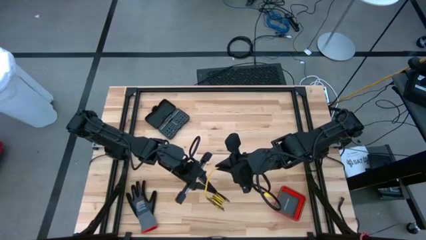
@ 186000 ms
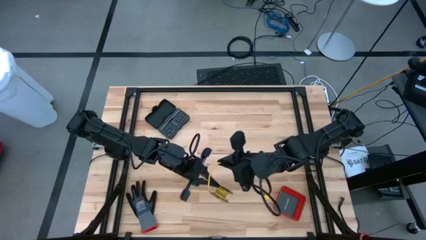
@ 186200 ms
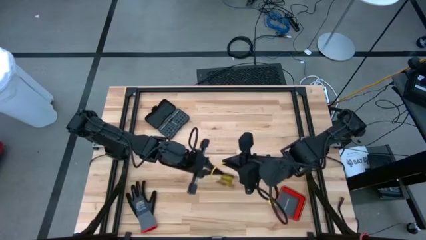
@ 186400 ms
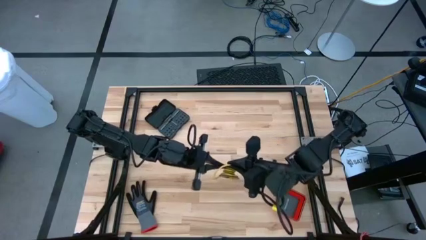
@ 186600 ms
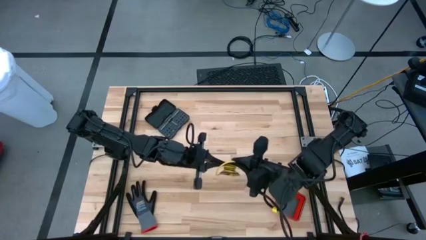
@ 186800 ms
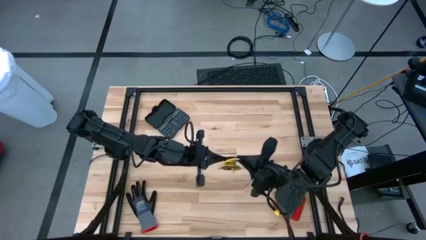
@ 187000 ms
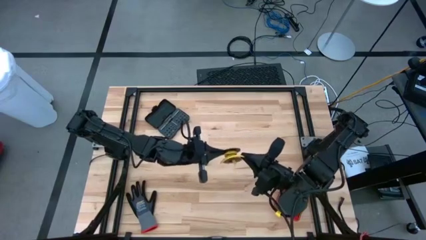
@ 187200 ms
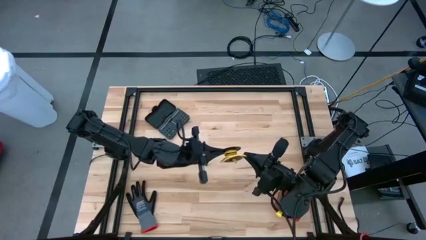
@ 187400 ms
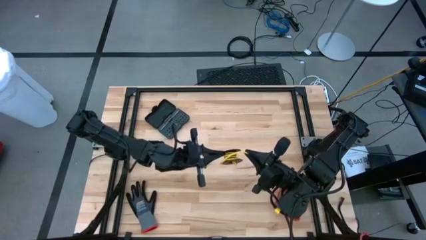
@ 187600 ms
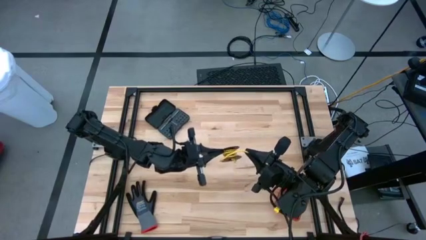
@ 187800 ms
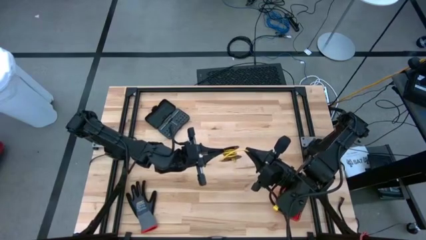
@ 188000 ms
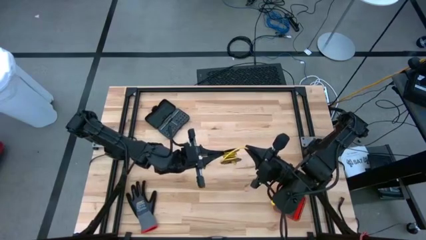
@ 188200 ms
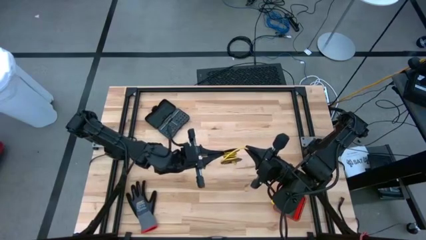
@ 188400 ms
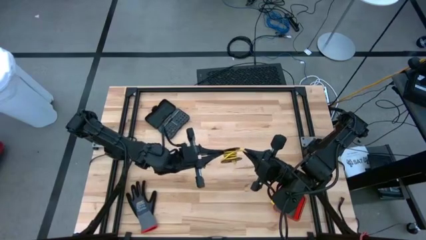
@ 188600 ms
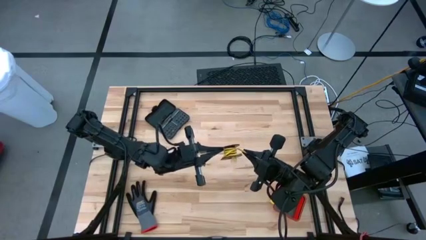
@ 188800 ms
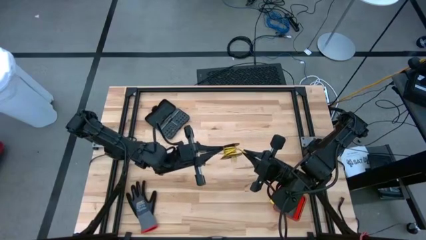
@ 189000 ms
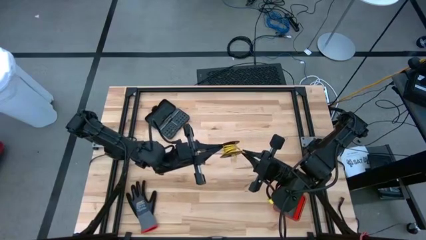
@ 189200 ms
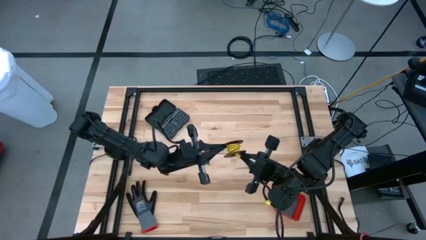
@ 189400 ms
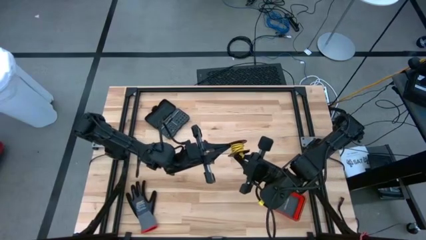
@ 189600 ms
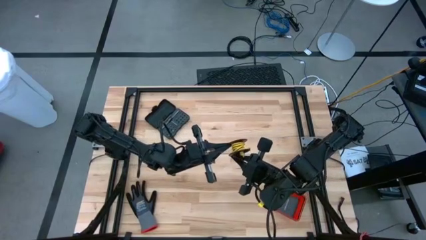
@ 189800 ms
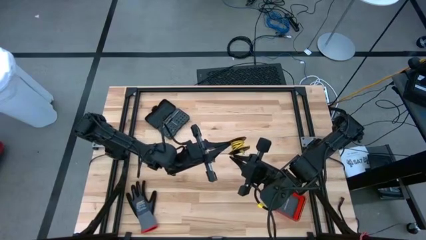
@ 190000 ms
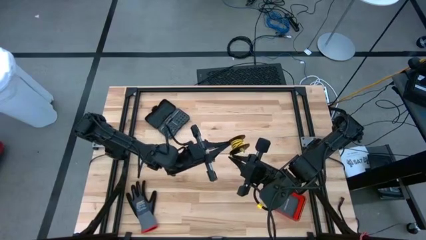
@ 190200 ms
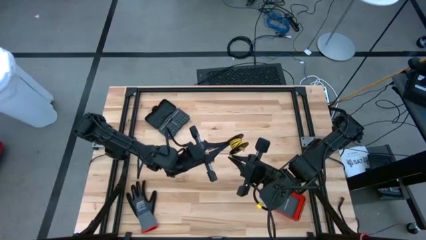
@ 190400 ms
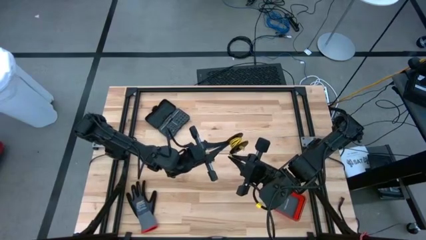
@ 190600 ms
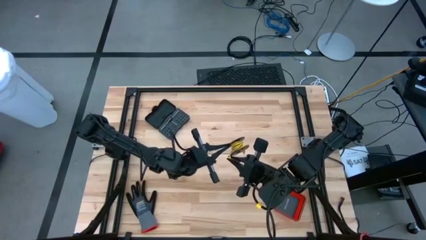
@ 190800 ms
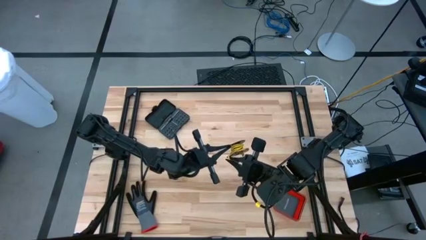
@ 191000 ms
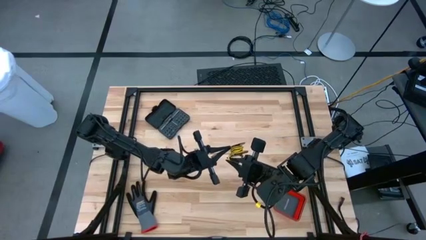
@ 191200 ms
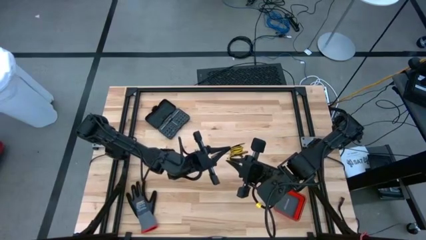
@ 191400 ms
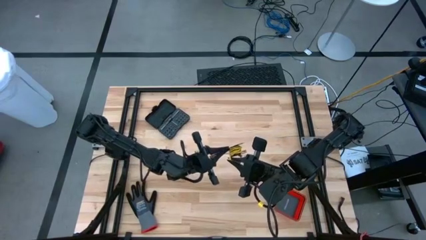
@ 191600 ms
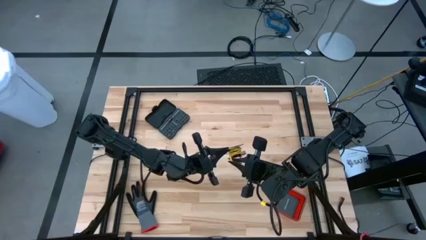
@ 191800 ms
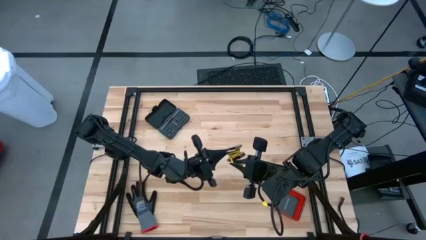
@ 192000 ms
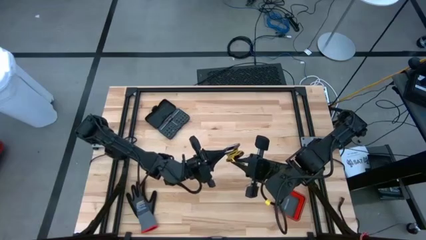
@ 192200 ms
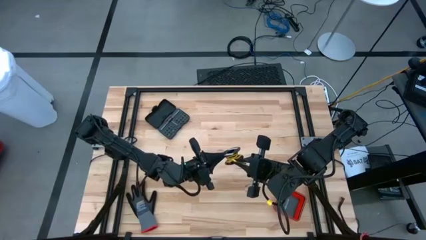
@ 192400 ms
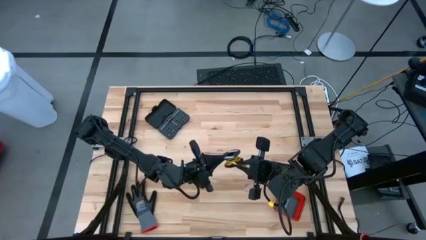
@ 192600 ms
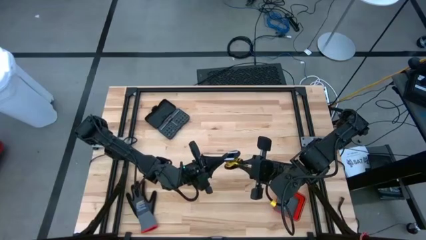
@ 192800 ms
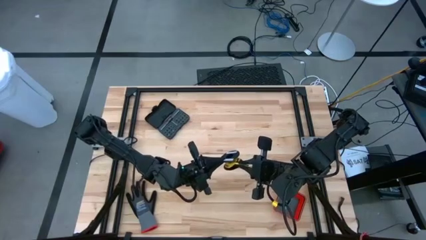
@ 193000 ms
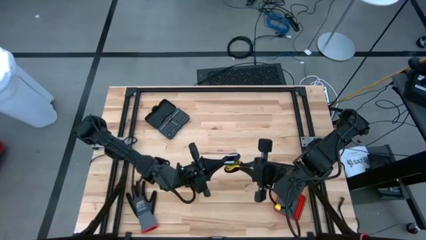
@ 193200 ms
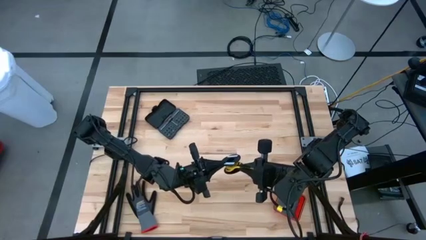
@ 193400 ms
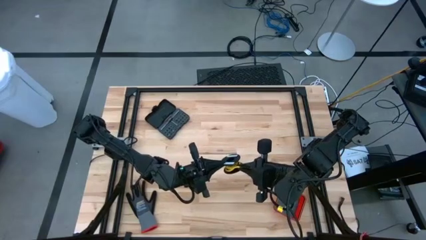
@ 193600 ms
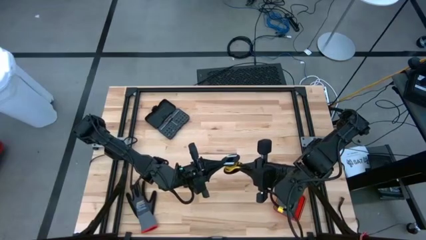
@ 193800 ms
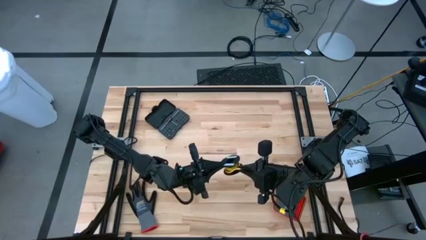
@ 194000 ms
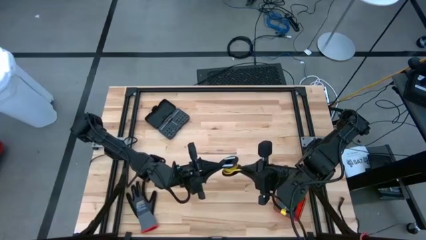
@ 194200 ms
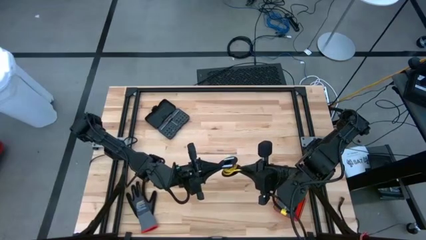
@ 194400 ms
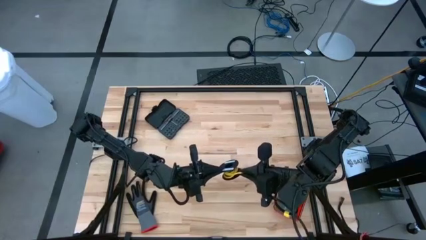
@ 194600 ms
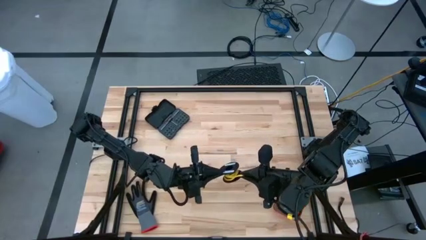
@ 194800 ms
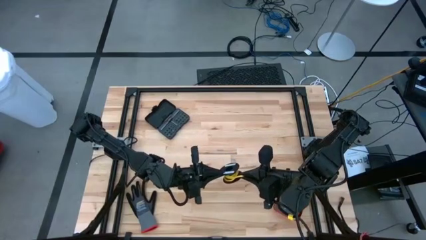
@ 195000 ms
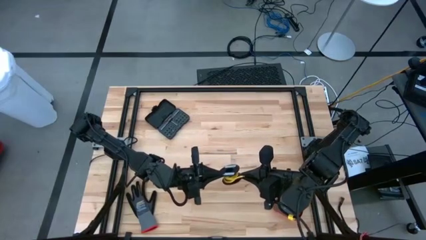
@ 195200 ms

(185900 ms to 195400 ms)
Task: Coil cords
Coil the yellow wire onto the spool

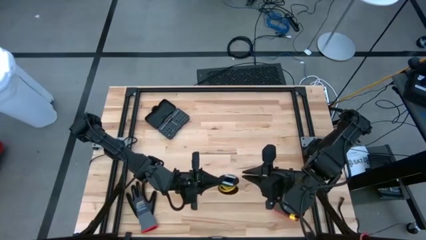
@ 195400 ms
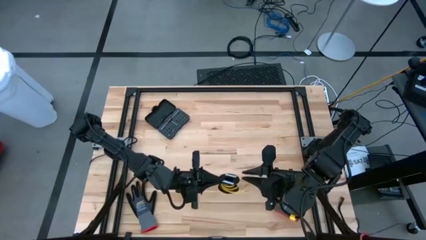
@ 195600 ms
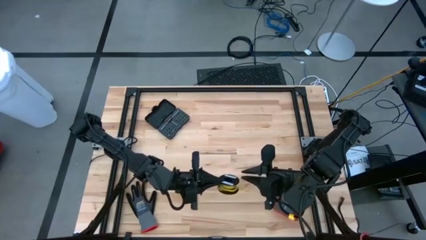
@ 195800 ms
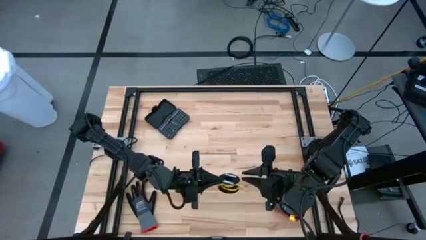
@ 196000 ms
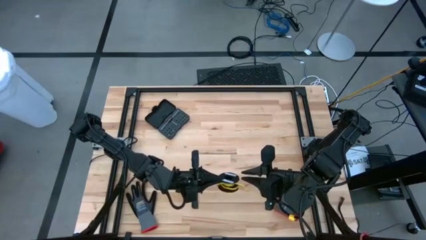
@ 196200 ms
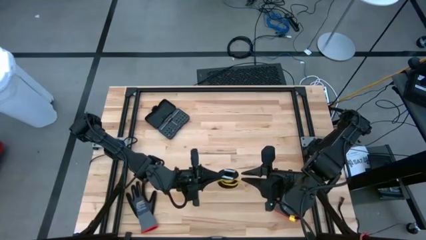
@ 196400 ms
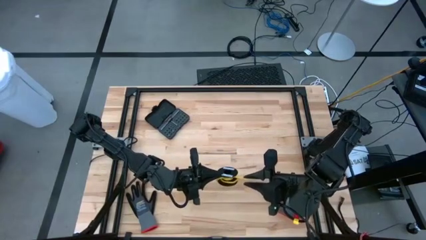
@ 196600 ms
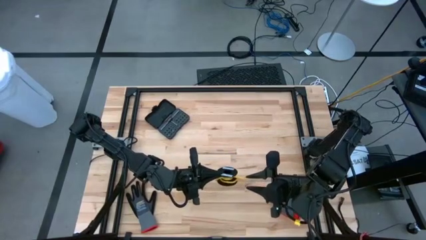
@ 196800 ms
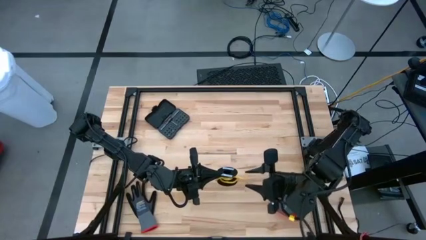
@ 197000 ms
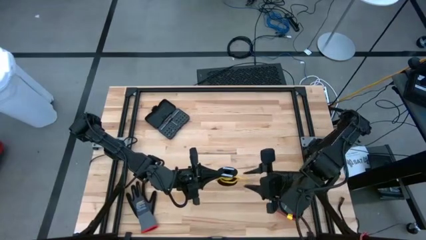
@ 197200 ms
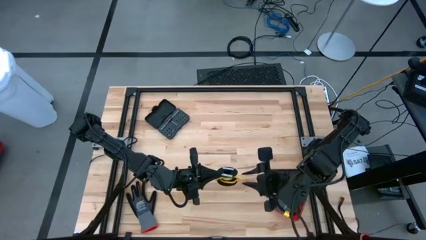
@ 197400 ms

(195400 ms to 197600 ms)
Coil the yellow wire onto the spool

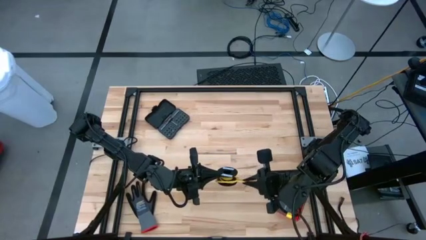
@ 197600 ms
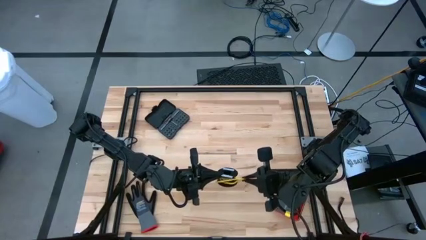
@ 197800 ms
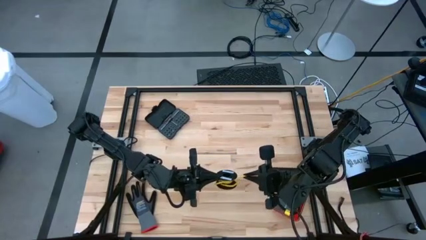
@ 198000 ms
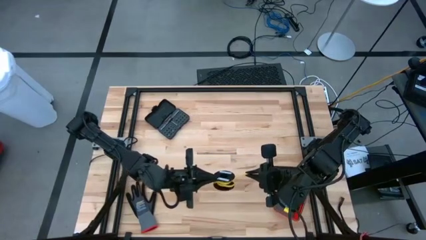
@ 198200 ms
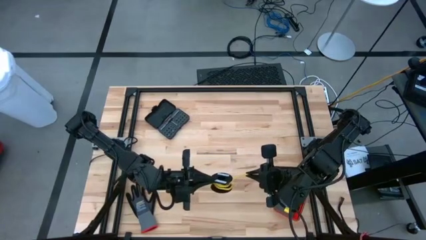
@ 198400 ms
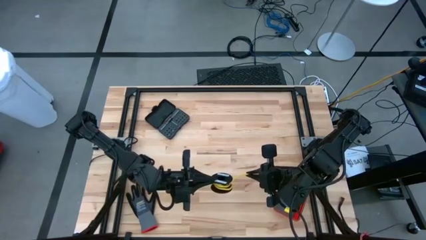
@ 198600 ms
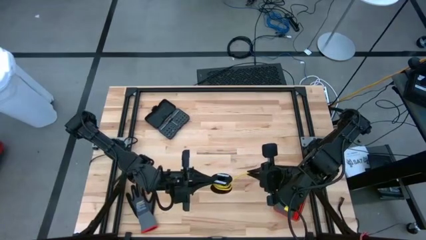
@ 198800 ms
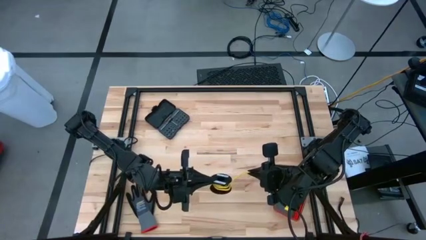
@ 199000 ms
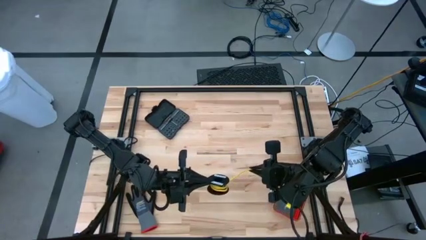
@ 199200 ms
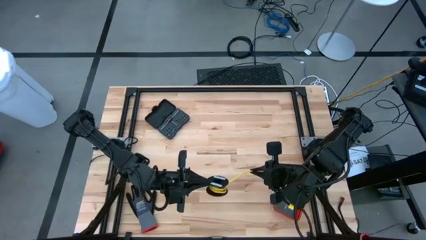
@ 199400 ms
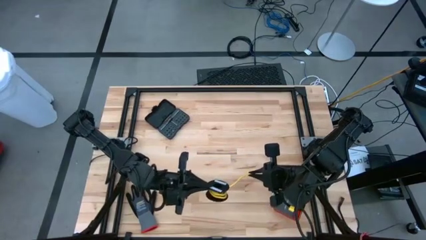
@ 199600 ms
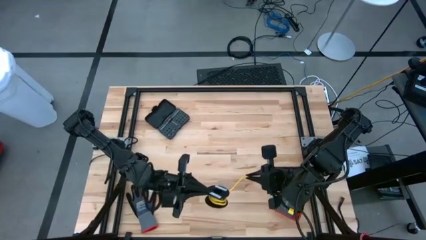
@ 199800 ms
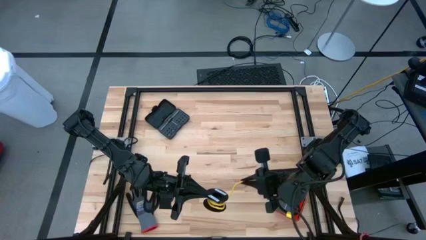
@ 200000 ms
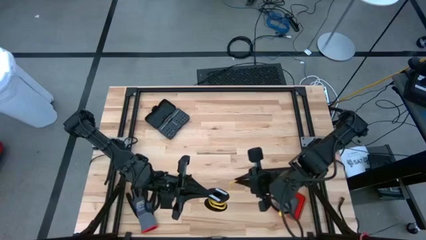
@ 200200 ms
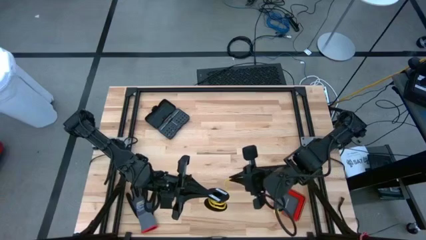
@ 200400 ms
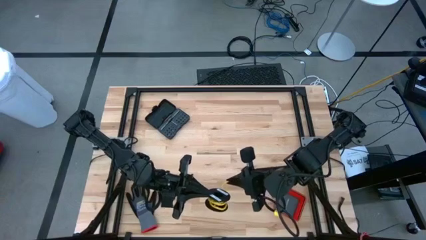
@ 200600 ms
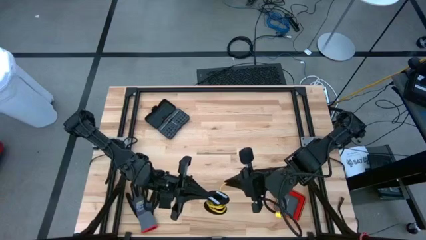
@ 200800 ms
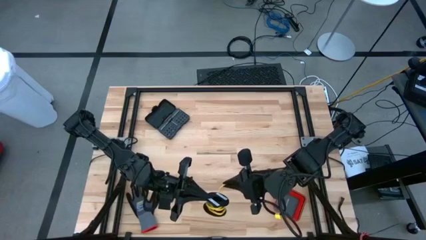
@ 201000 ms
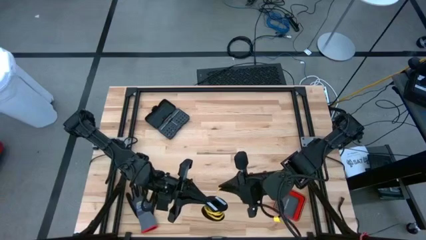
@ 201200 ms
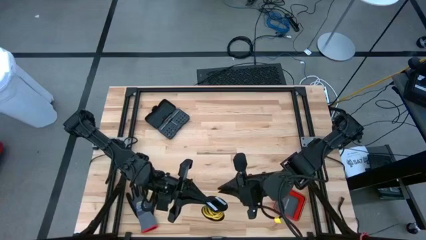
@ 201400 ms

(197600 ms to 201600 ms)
Coil the yellow wire onto the spool
